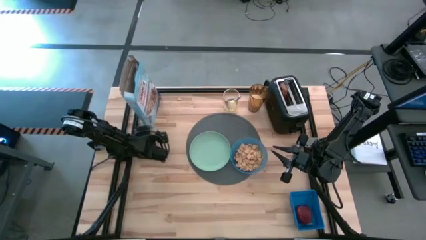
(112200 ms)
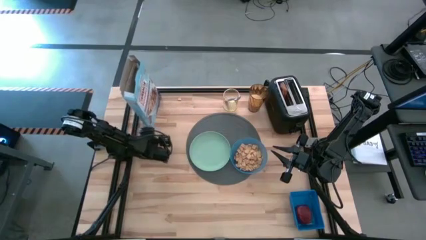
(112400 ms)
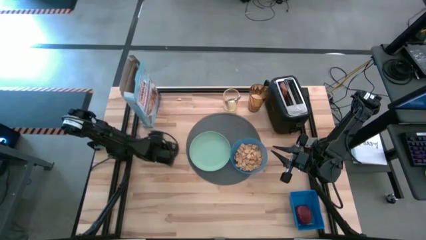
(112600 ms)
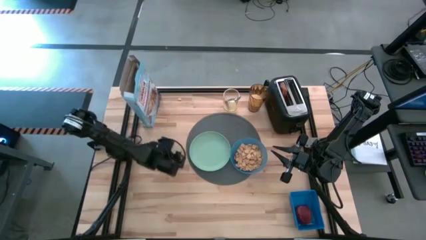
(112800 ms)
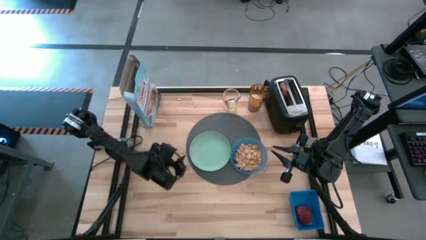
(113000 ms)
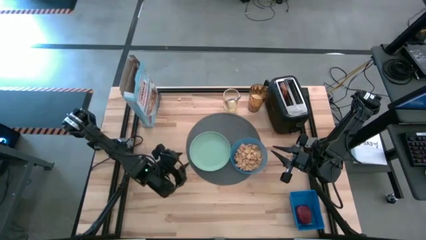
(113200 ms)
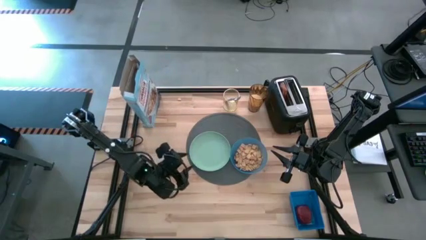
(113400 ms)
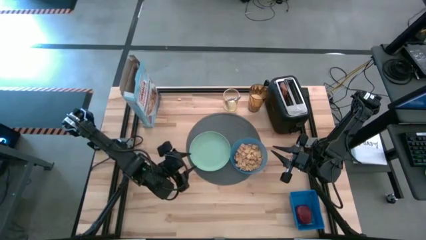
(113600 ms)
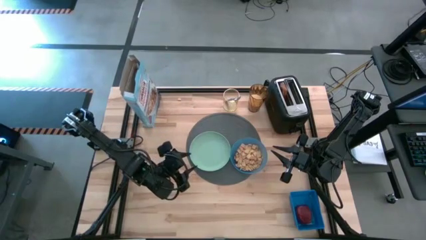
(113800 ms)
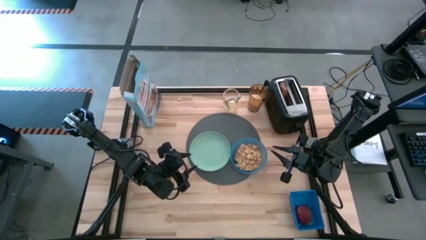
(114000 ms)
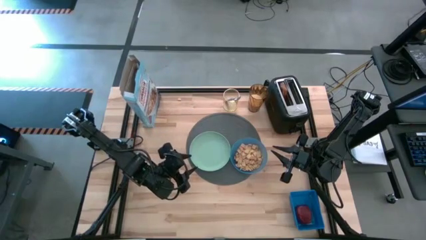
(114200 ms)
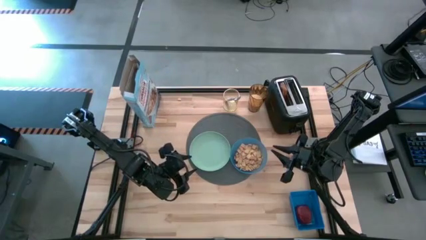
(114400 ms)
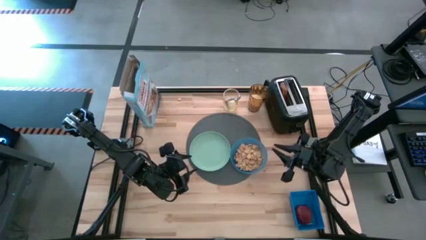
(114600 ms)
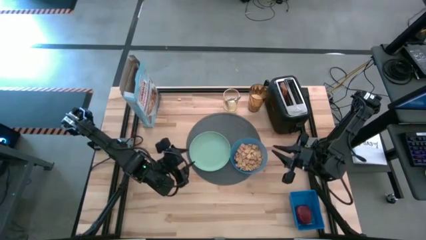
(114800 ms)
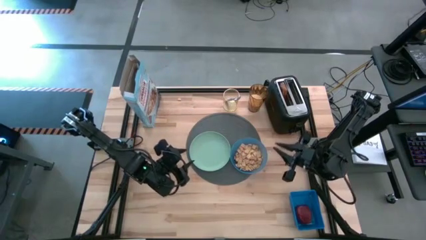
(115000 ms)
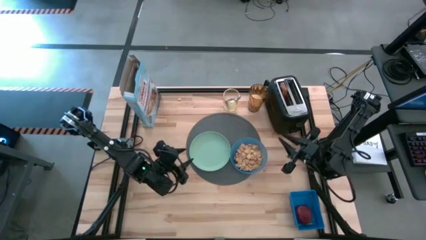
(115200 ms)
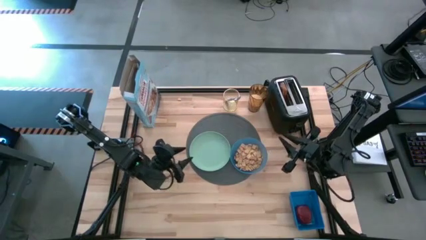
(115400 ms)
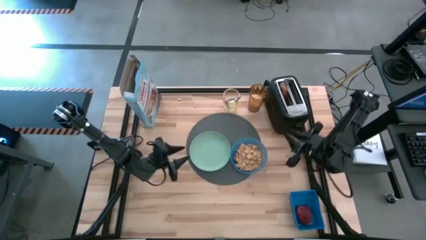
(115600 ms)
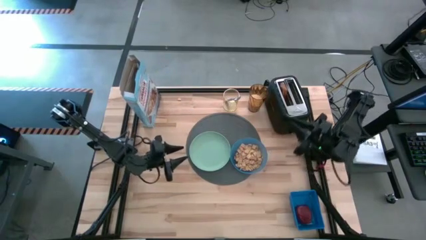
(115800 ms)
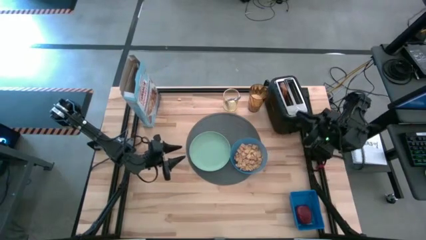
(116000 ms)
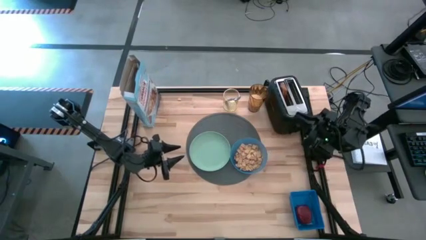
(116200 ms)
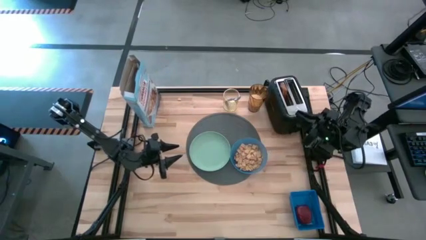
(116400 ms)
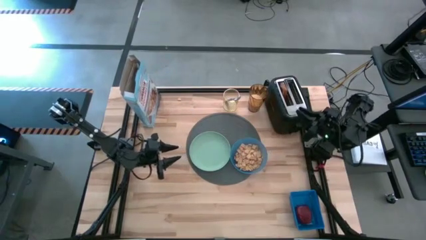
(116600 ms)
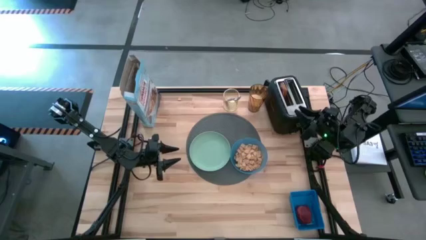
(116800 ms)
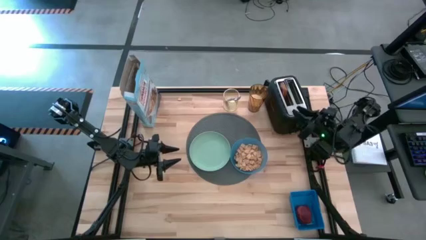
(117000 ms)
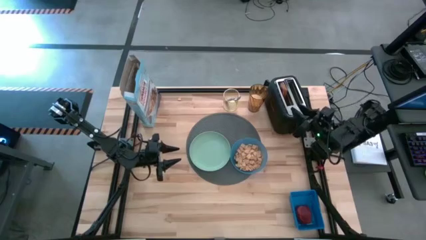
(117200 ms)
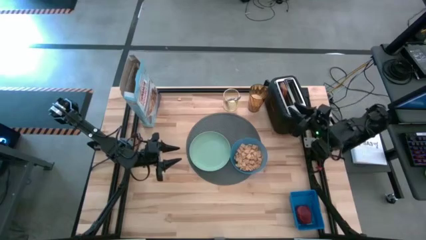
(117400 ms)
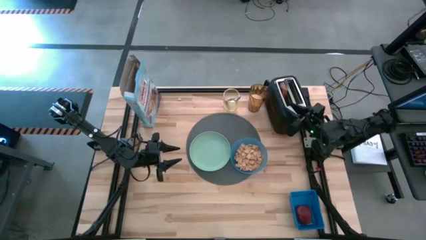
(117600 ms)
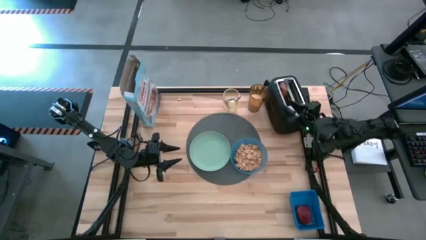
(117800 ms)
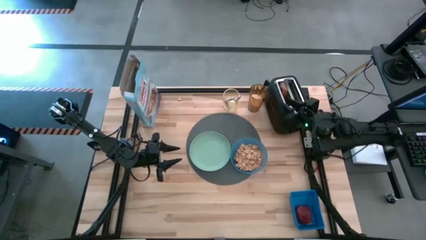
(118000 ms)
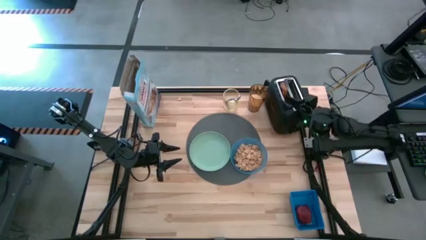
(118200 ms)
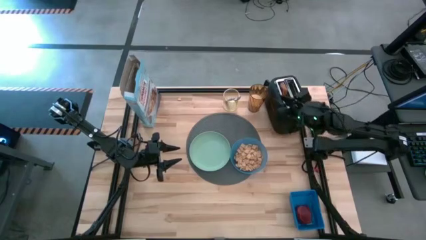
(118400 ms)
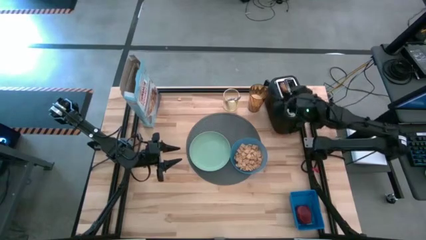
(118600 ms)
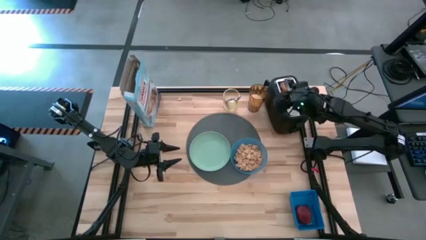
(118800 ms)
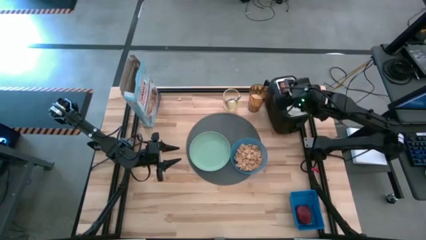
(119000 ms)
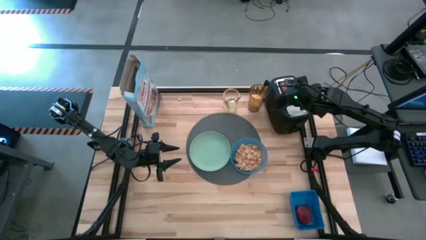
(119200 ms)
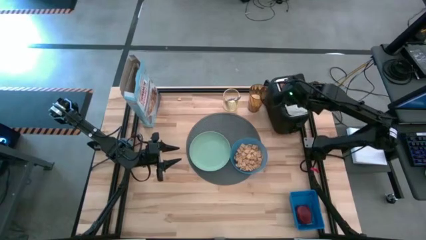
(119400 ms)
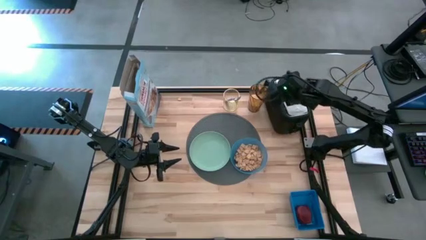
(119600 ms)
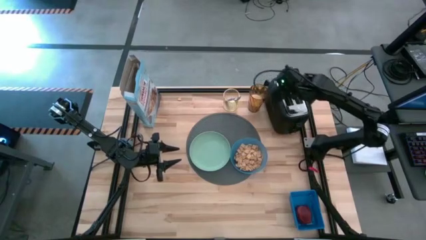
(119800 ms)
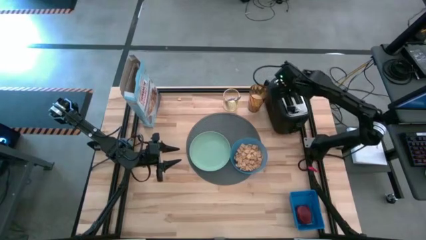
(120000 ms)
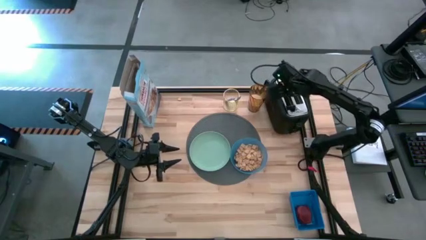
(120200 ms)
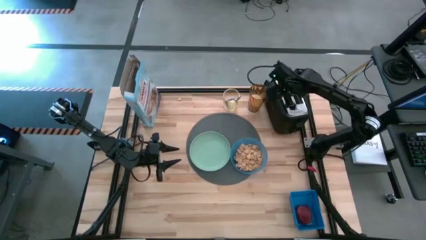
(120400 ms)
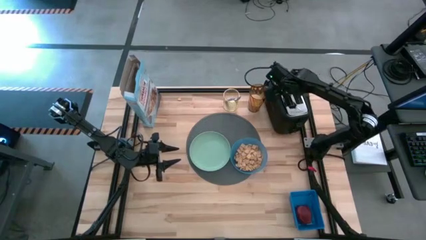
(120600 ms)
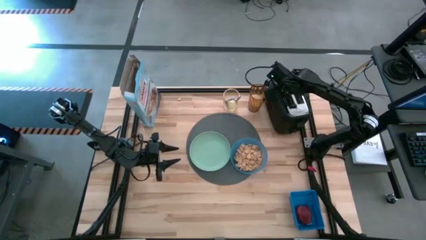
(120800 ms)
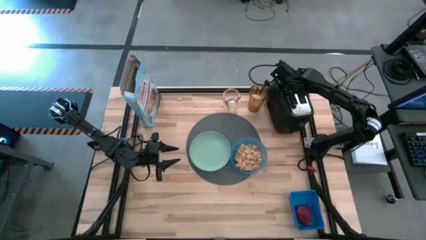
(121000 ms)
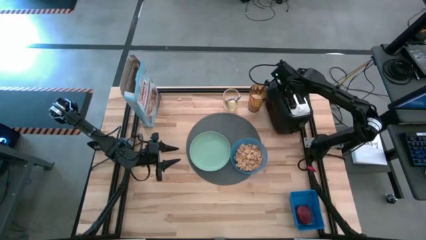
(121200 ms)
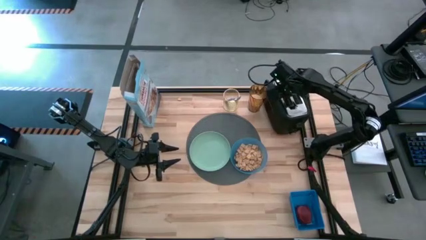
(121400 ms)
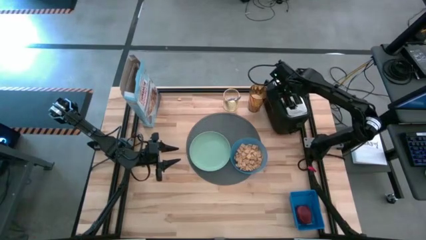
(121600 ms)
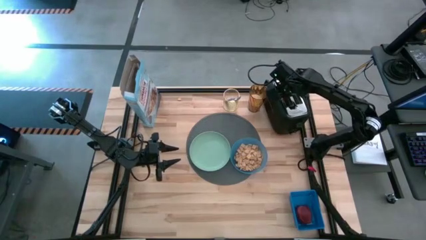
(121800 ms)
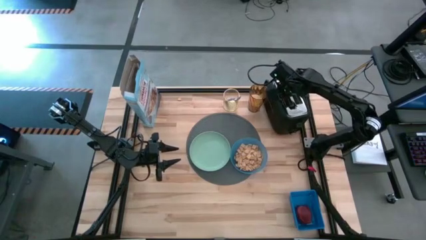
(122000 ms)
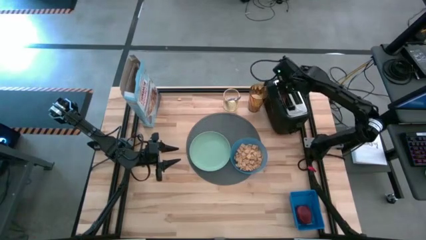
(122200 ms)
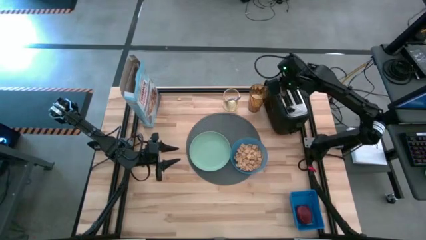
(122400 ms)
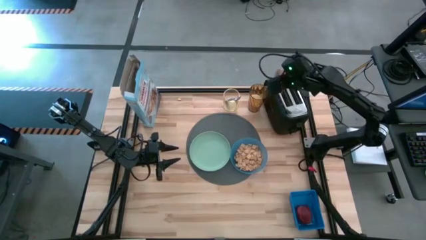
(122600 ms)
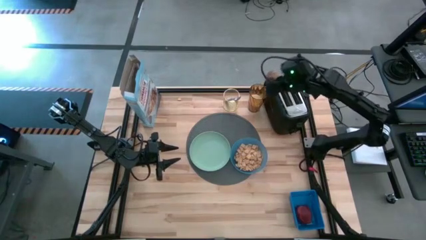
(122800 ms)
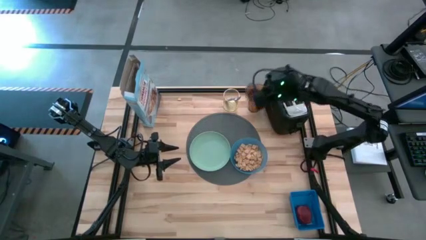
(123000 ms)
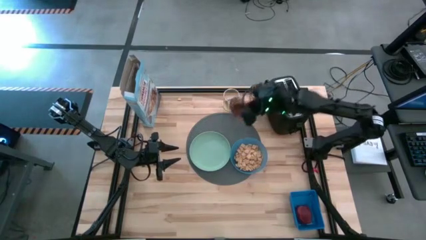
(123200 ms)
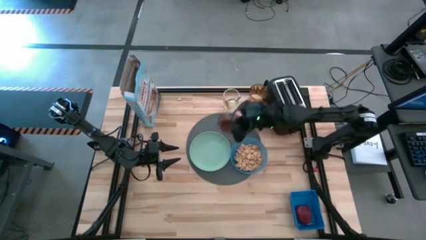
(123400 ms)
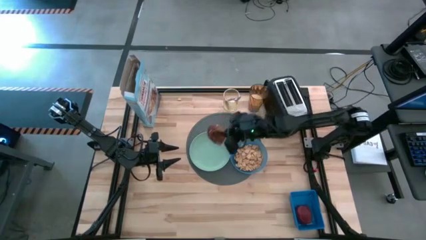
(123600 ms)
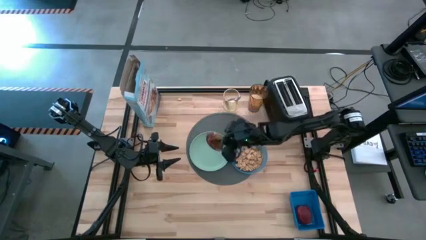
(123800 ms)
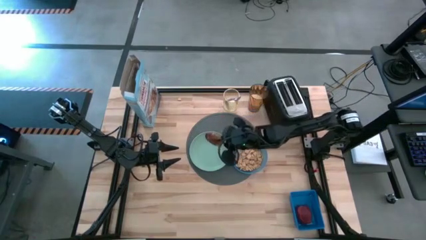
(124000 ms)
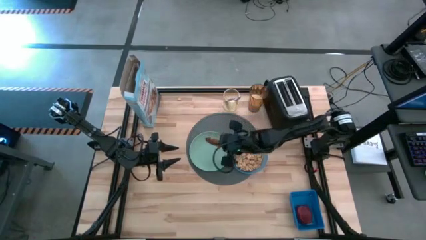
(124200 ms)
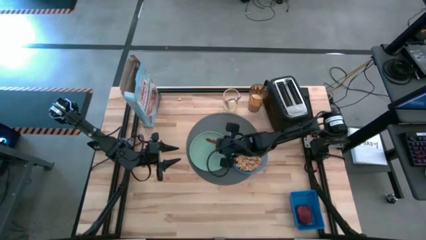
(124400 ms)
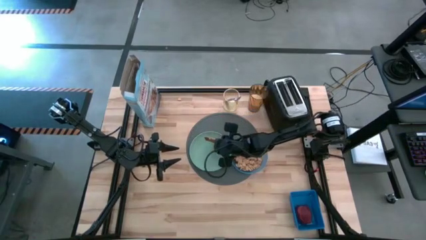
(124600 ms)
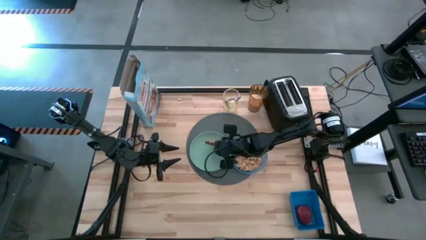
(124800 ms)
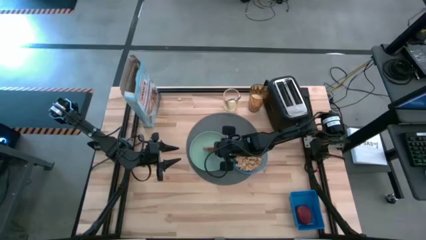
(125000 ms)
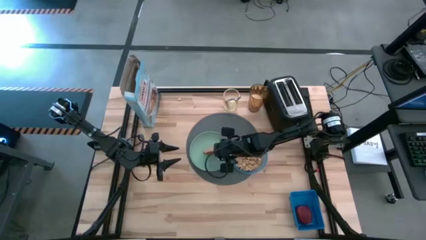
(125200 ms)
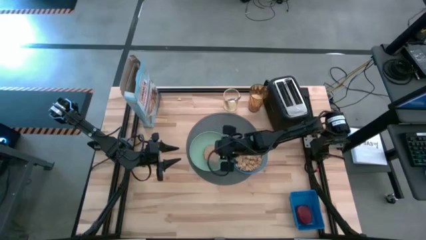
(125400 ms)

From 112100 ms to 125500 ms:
Task: Arrange a breakfast setting
Put the toasted bread from the toaster on the green plate

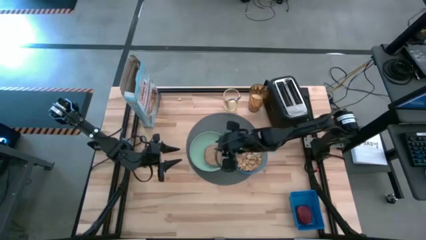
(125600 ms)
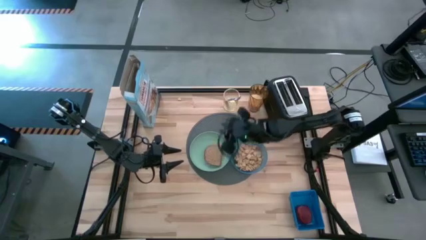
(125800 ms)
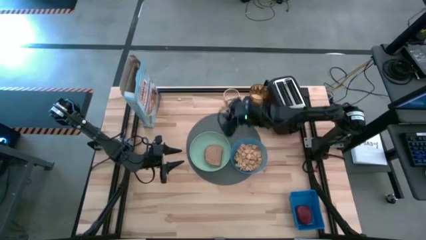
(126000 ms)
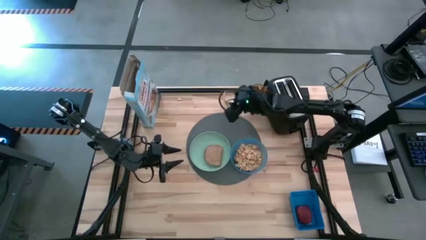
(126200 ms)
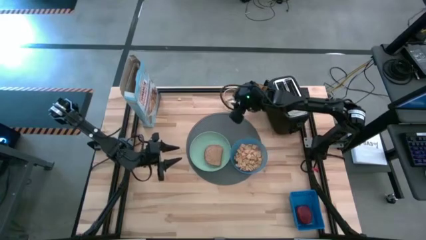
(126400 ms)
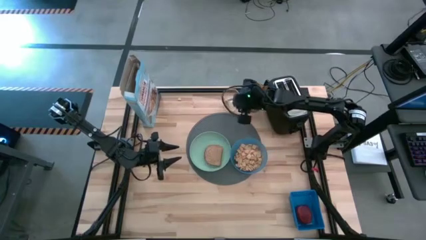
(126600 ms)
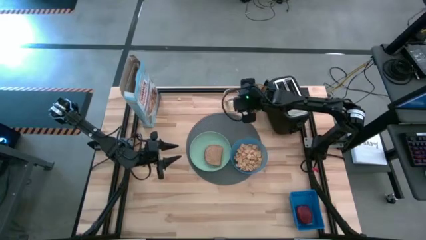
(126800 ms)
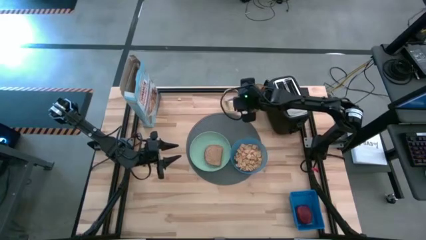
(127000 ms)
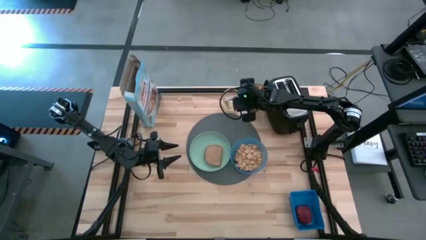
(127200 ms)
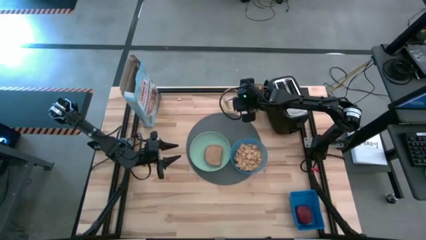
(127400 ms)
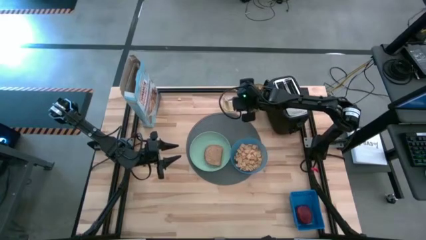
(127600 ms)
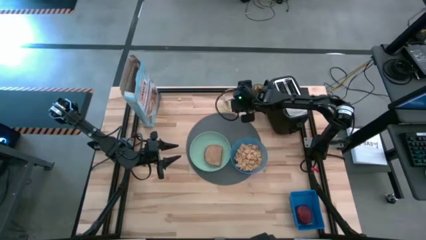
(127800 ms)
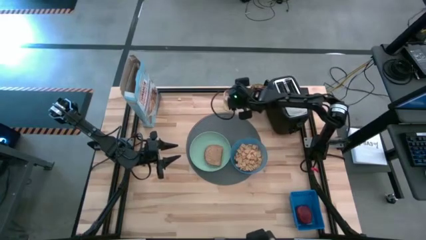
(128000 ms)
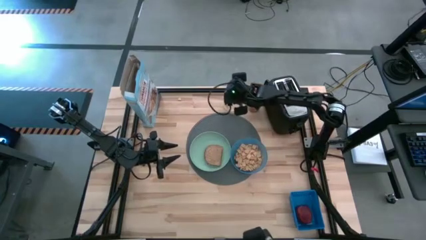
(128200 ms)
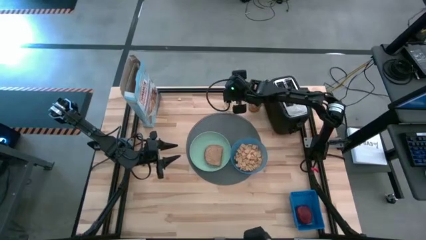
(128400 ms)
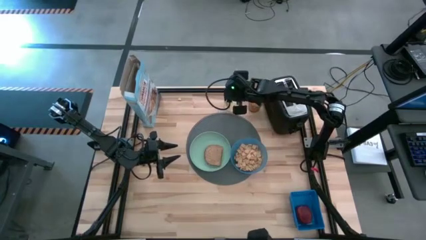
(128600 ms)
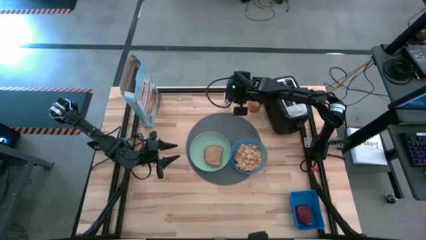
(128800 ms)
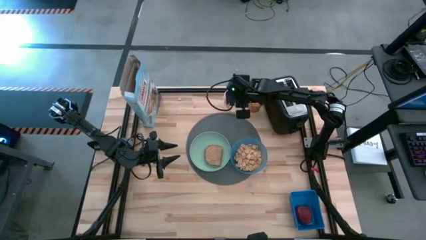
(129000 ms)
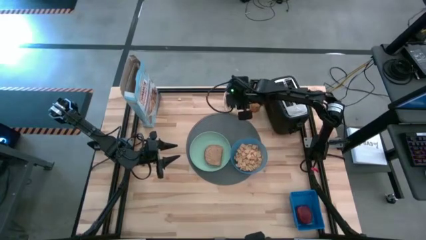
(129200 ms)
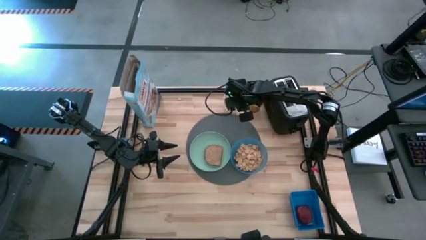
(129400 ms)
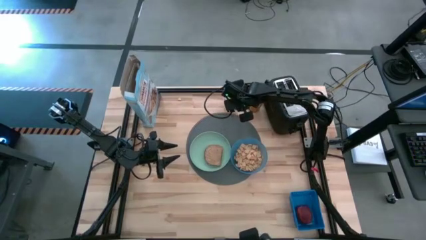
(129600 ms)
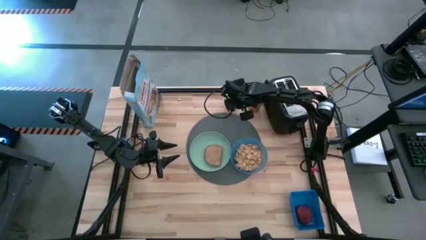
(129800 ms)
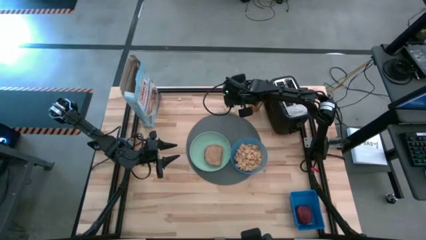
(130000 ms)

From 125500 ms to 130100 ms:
Put the purple spoon on the table to the right of the blue bowl
